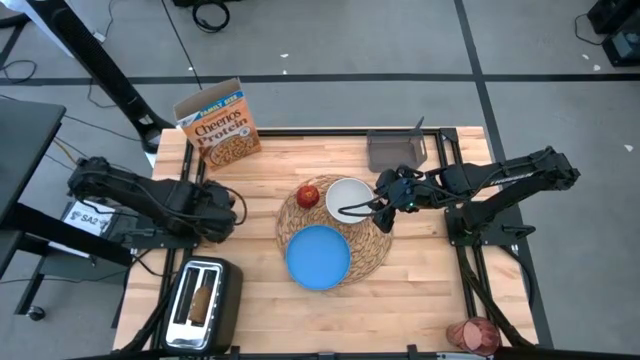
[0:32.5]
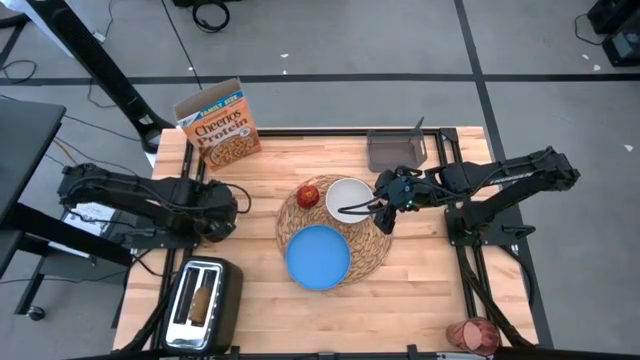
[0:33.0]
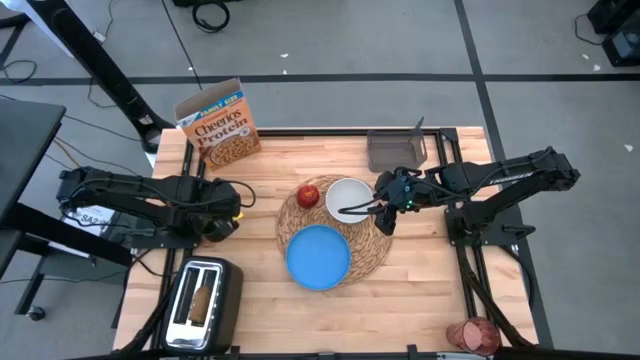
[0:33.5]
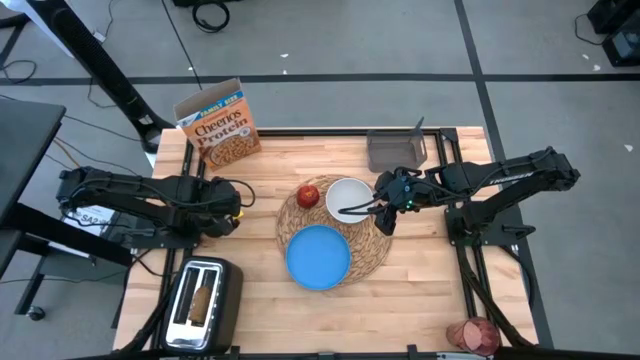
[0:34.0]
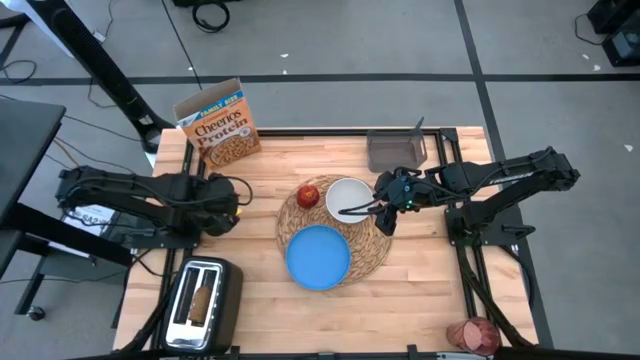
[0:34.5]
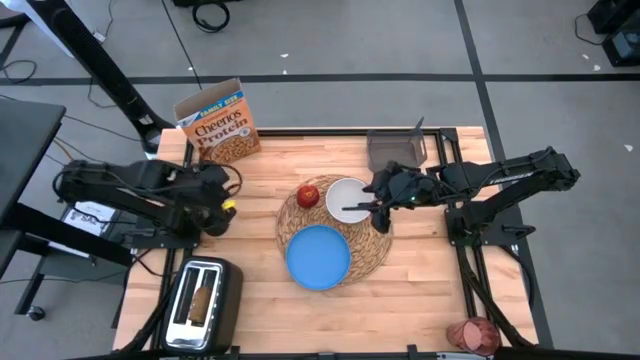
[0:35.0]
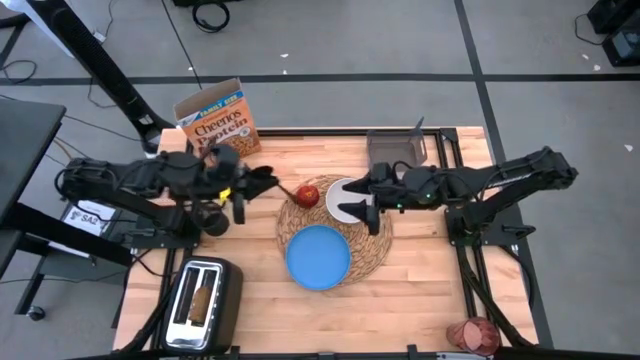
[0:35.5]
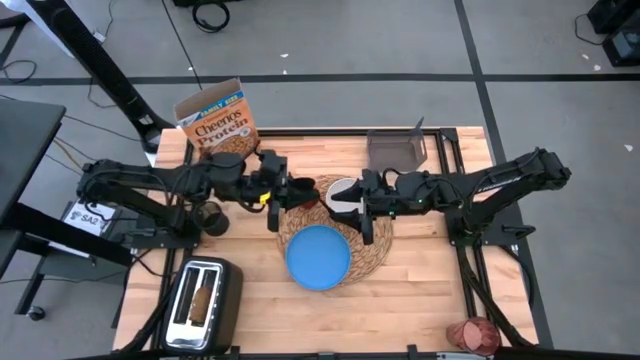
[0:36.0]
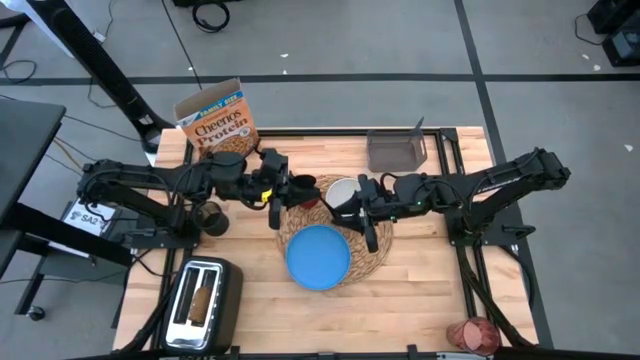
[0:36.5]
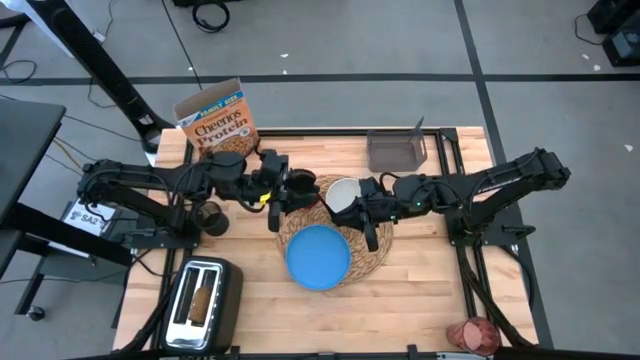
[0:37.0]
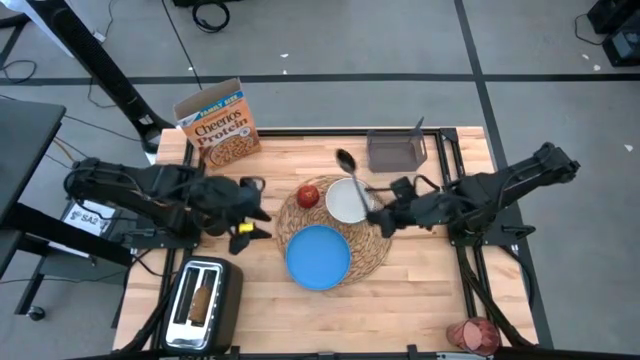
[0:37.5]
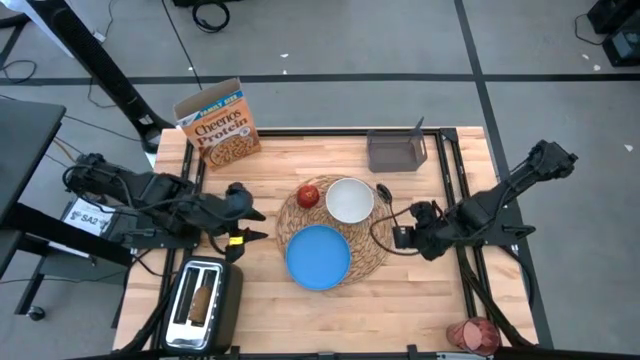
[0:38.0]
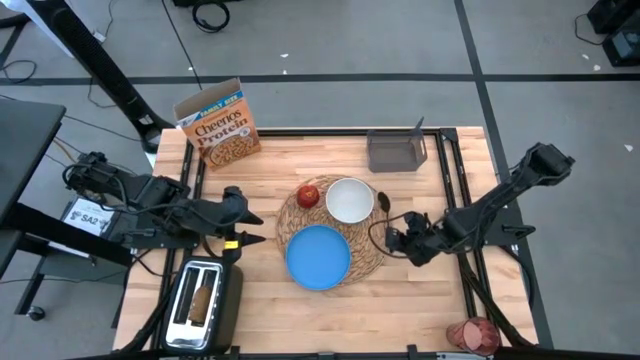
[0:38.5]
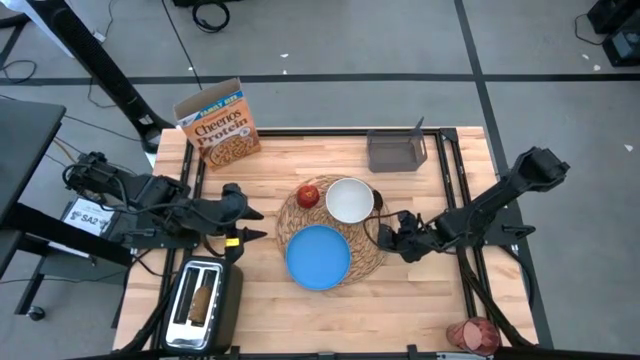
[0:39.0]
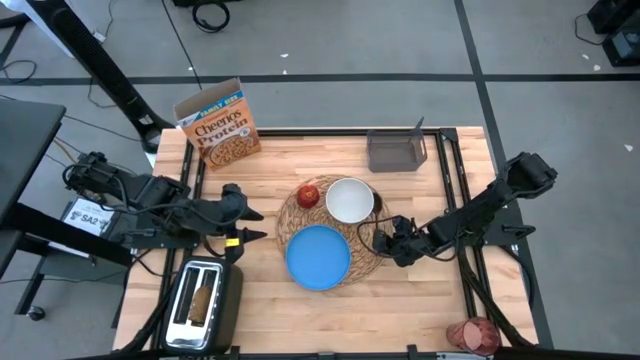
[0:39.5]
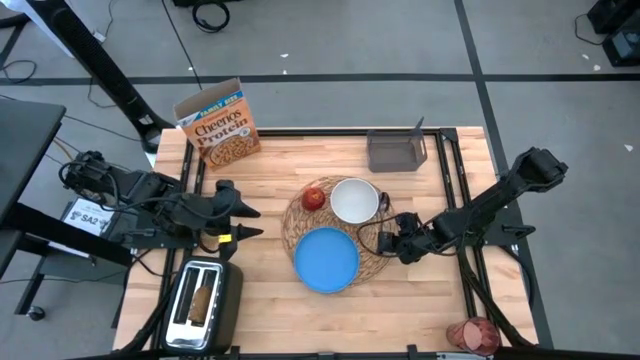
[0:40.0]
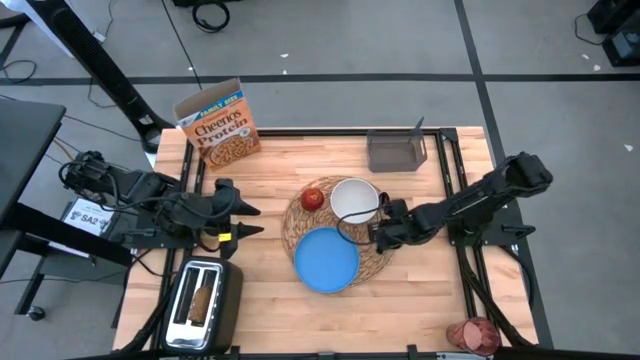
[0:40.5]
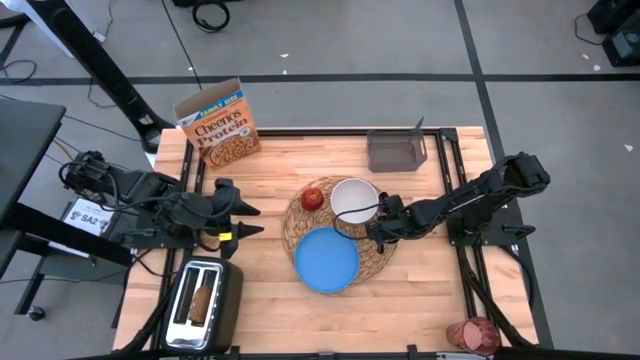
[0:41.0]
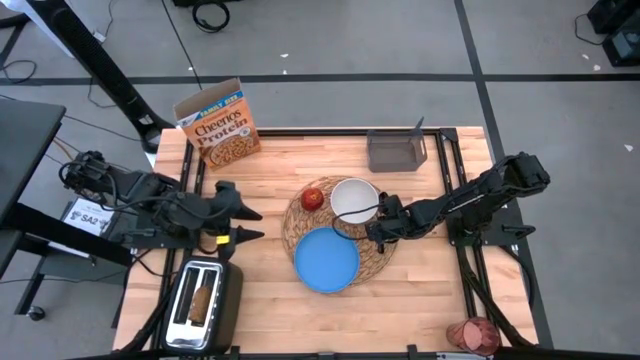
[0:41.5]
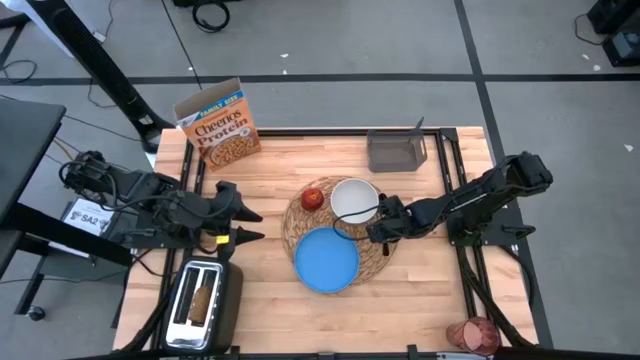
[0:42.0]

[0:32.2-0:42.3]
Task: Arrange a breakfast setting
Put the black spoon on the brown placemat beside the white bowl

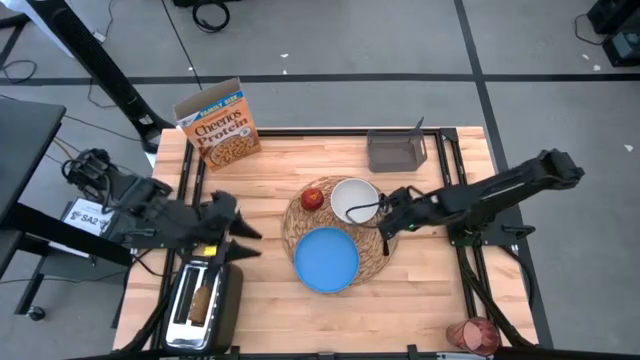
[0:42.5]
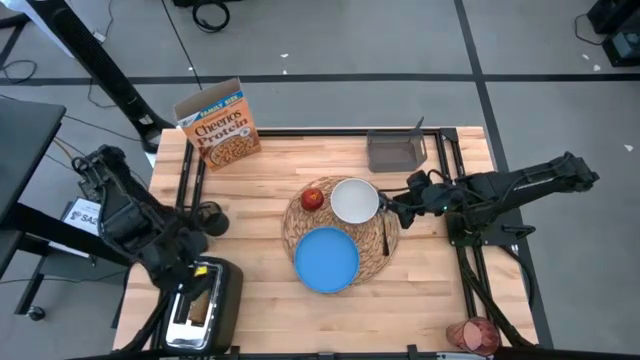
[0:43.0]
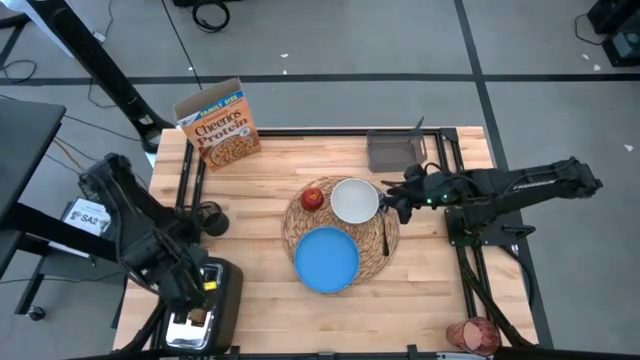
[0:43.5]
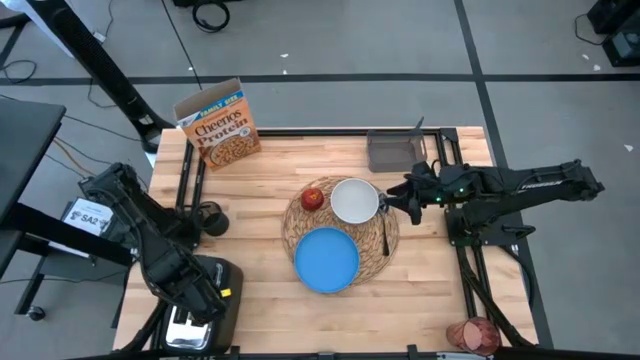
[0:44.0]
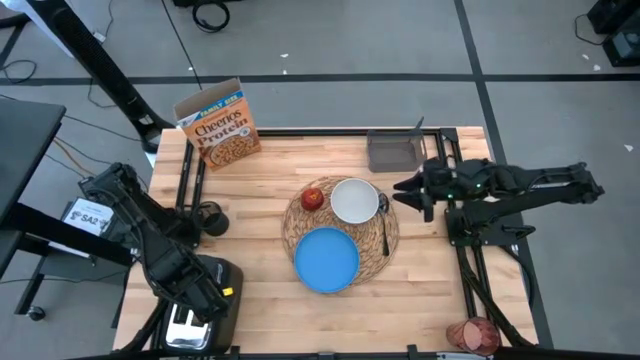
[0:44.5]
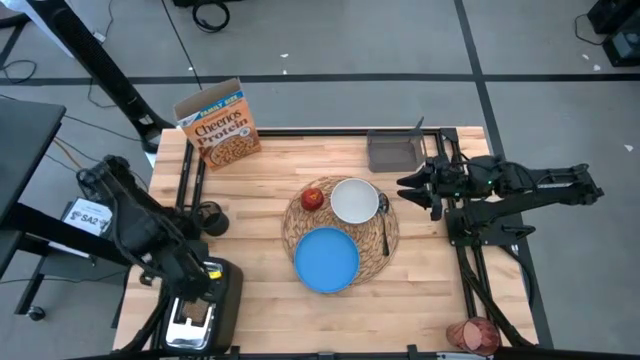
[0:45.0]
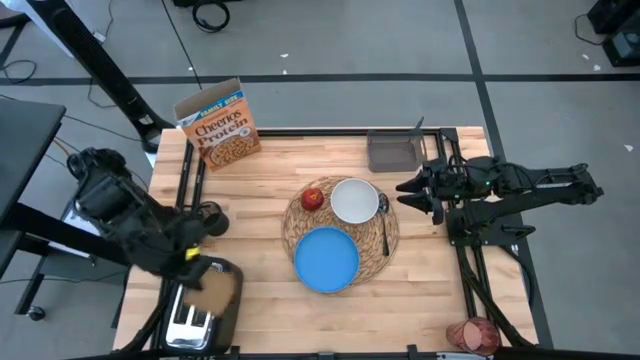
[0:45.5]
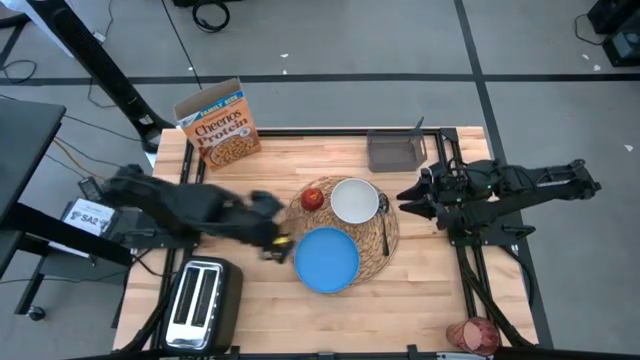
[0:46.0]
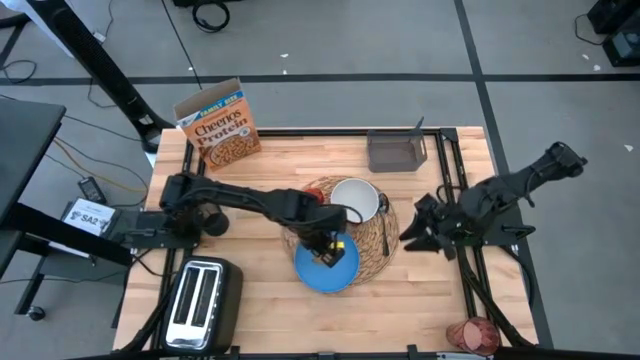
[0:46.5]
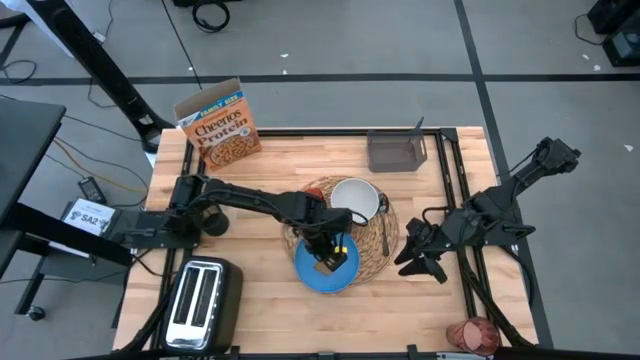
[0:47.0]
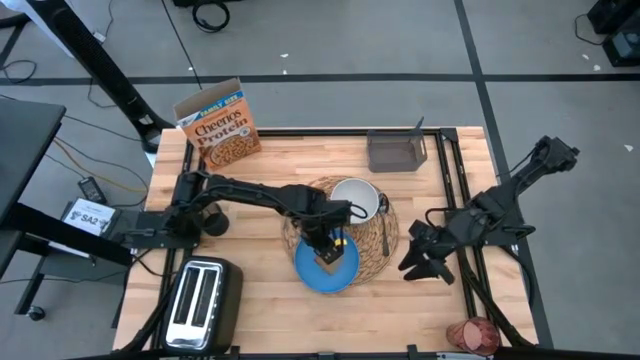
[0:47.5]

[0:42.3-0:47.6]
Put the toast bread on the blue plate

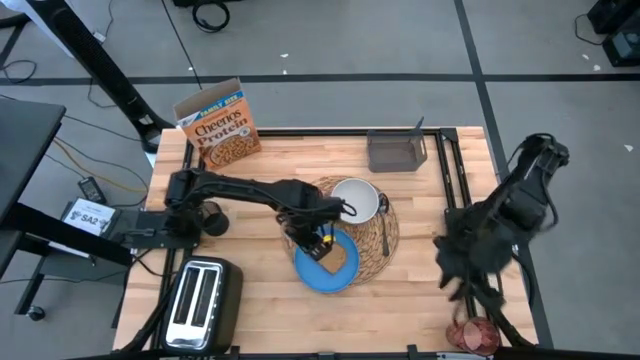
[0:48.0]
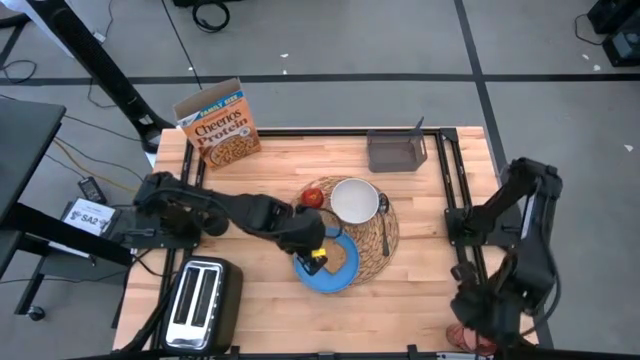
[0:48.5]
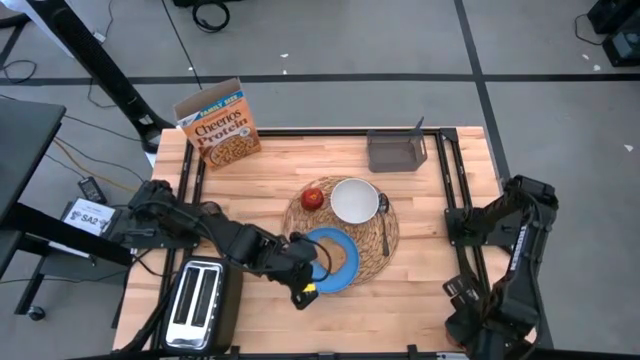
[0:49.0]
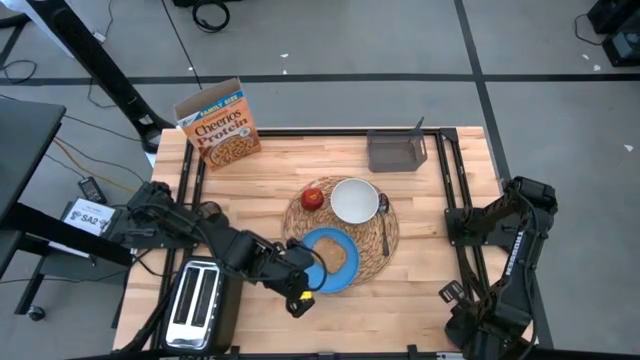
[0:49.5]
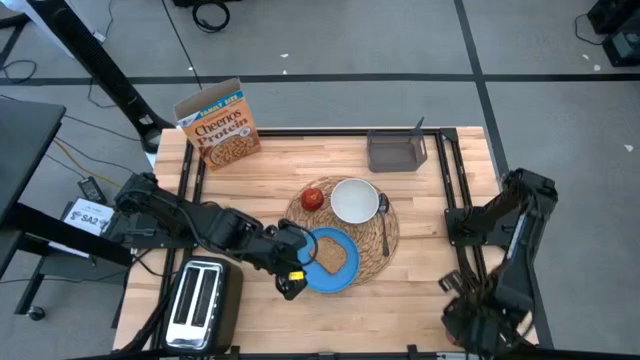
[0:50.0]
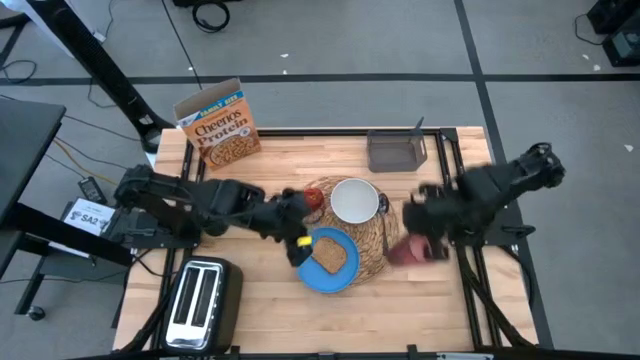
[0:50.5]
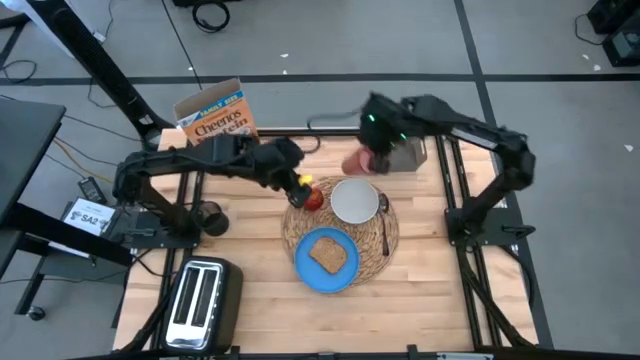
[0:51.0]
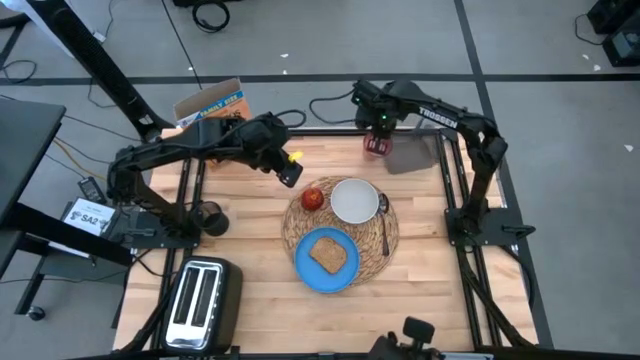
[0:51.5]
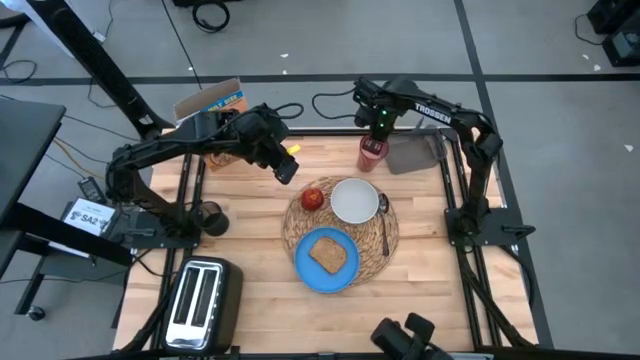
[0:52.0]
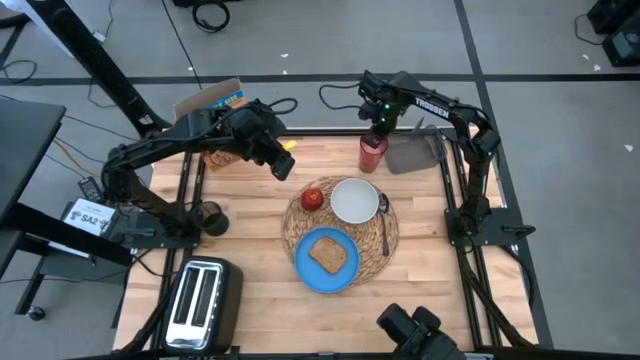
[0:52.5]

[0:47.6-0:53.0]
Move the pink cup with milk to the top right of the table above the brown placemat

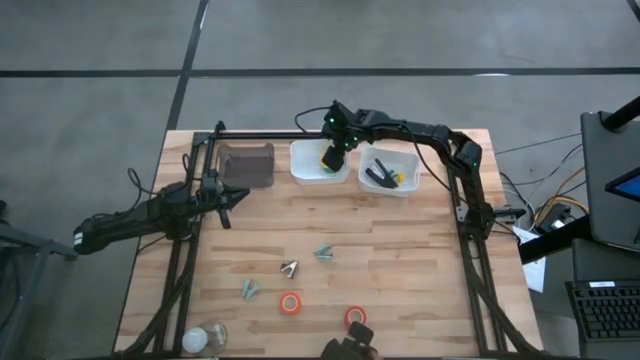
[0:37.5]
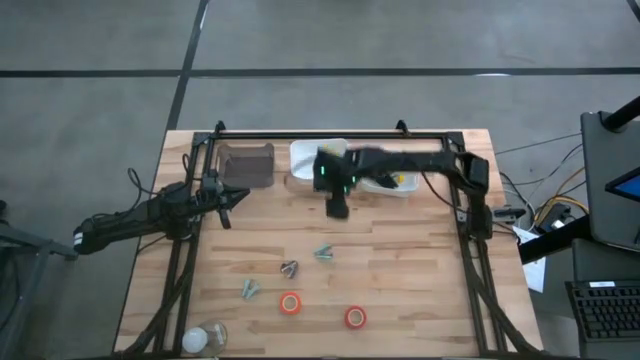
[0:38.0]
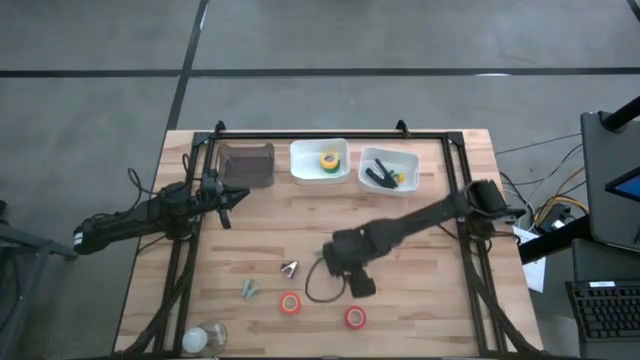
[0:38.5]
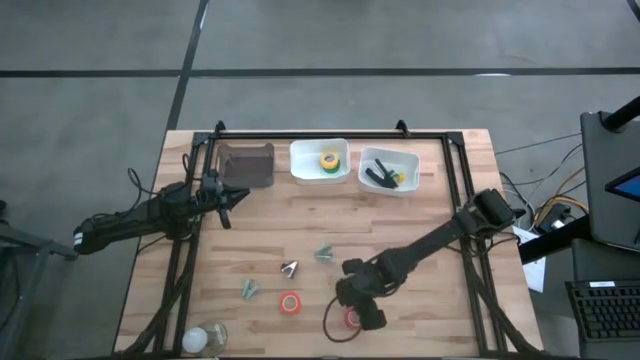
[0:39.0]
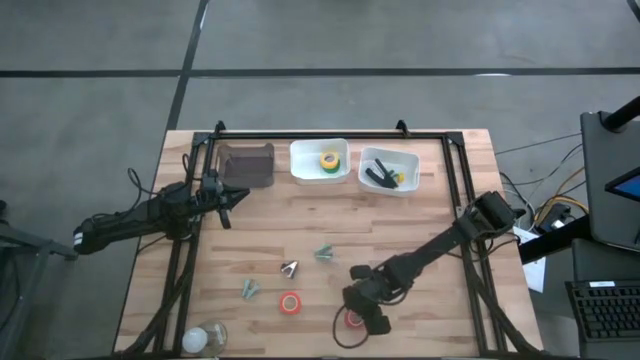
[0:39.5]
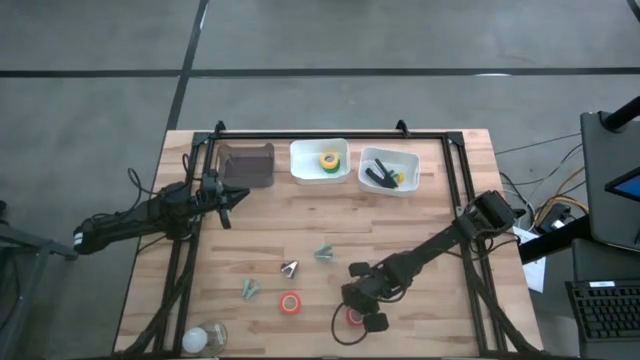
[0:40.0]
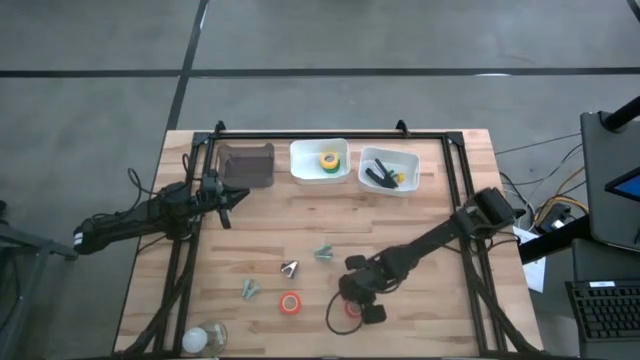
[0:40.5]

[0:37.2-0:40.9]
Task: Pick and place Stapler, Stapler remover, tape
Put the red tape into the left white bin
